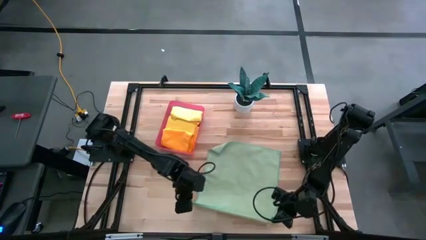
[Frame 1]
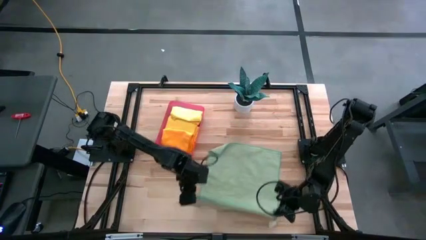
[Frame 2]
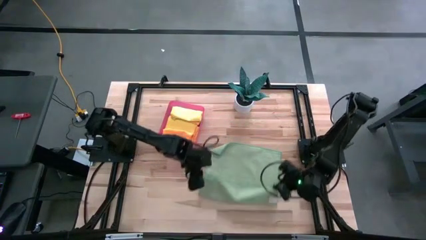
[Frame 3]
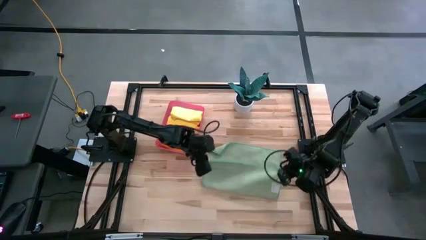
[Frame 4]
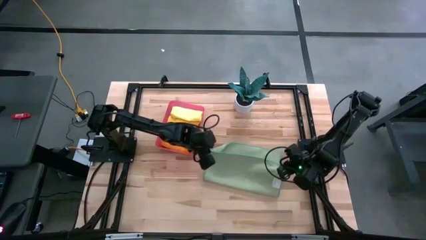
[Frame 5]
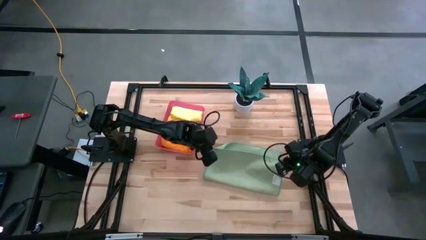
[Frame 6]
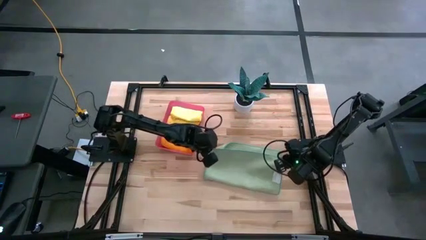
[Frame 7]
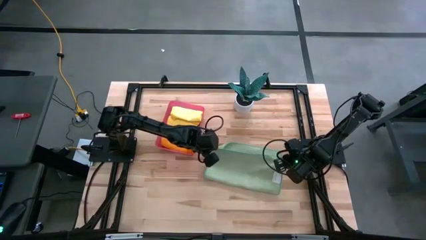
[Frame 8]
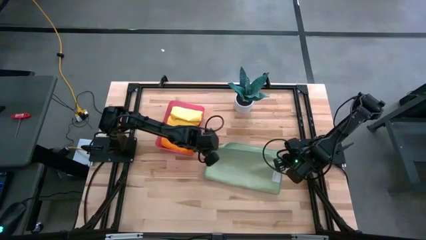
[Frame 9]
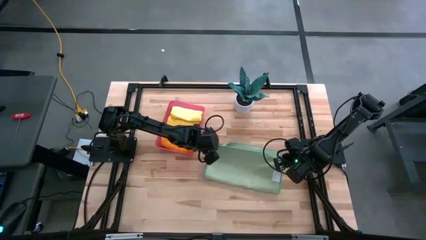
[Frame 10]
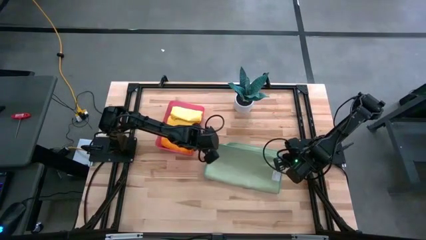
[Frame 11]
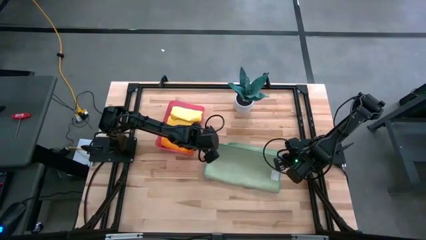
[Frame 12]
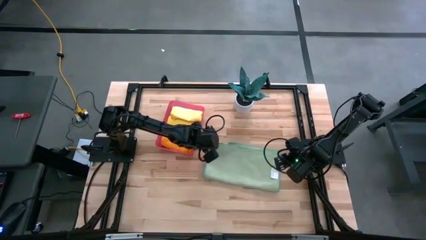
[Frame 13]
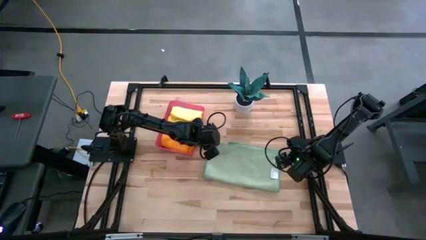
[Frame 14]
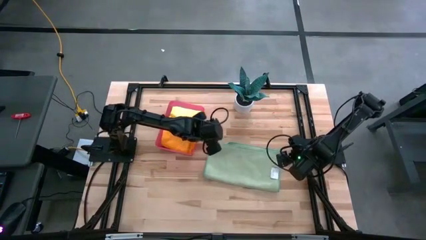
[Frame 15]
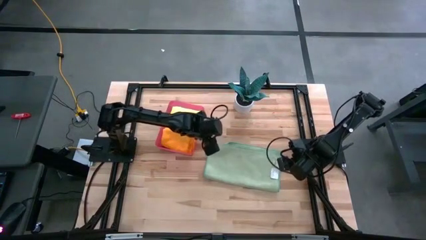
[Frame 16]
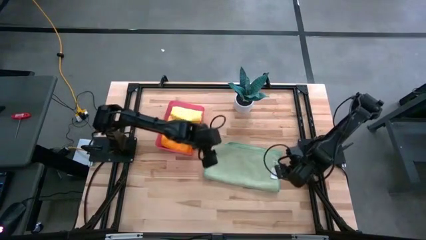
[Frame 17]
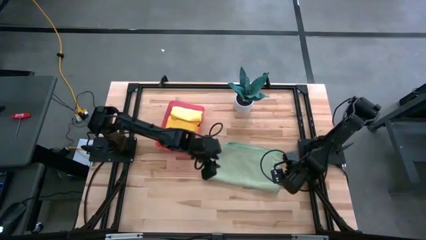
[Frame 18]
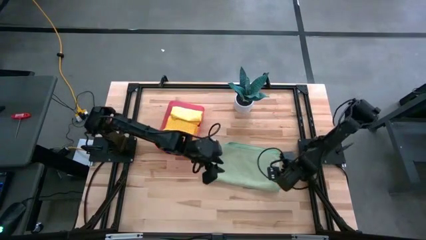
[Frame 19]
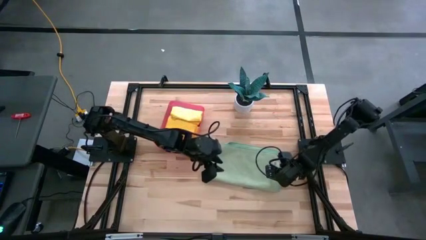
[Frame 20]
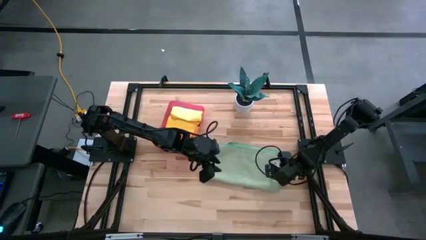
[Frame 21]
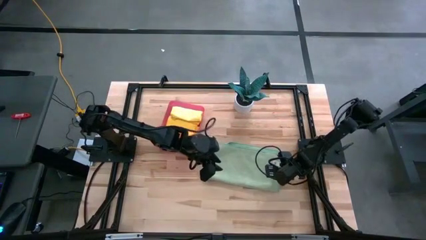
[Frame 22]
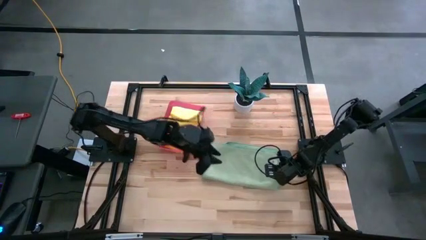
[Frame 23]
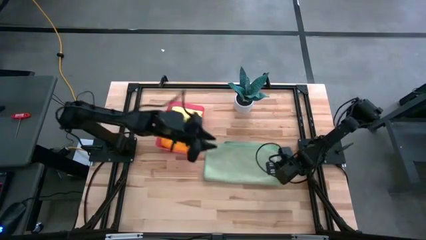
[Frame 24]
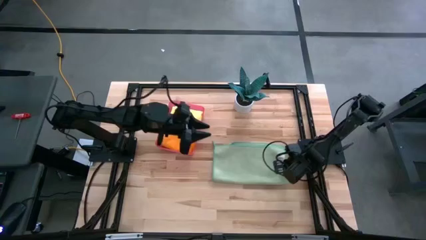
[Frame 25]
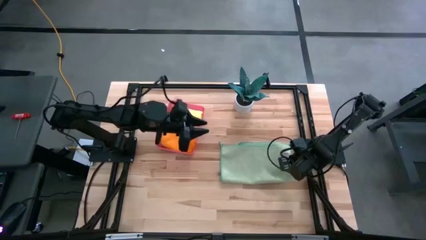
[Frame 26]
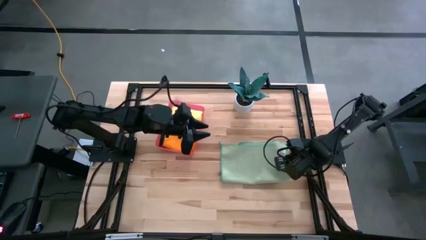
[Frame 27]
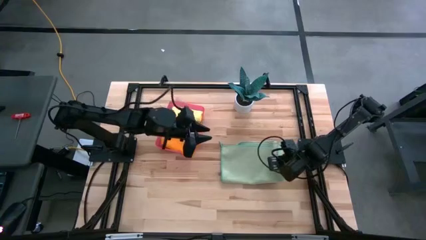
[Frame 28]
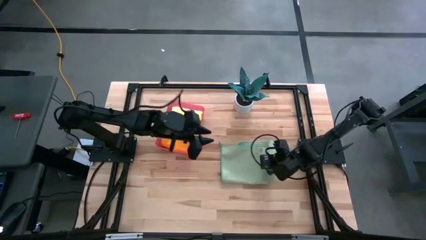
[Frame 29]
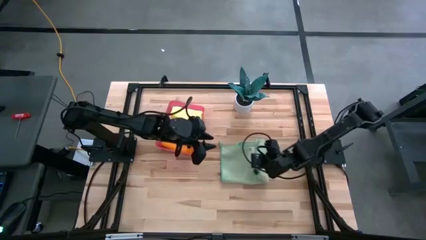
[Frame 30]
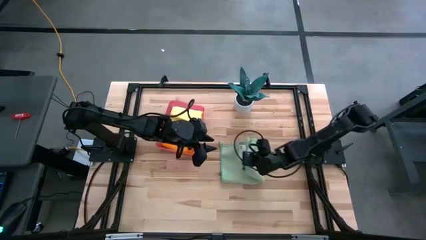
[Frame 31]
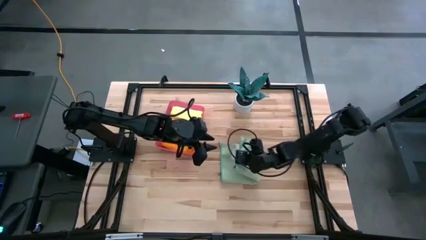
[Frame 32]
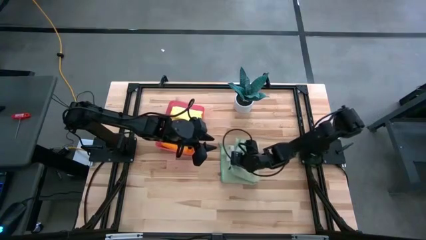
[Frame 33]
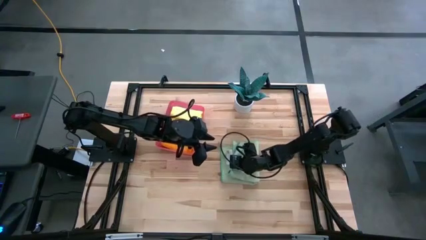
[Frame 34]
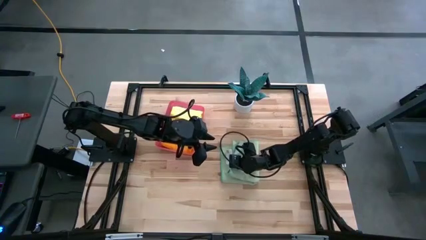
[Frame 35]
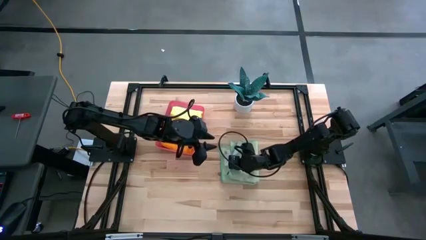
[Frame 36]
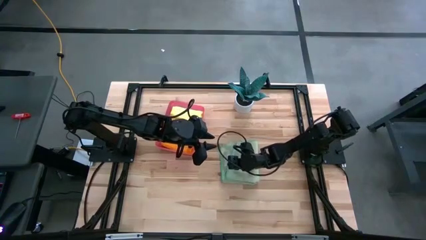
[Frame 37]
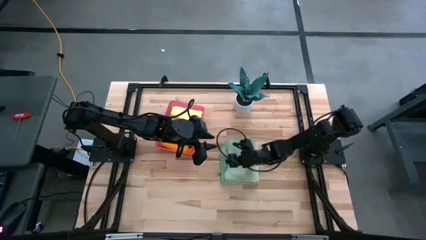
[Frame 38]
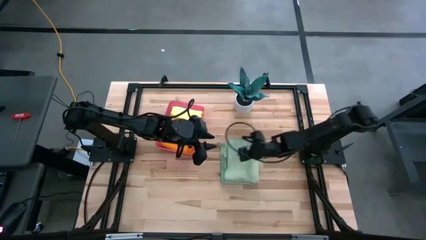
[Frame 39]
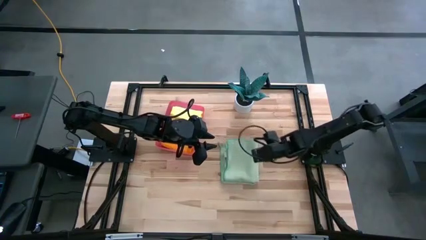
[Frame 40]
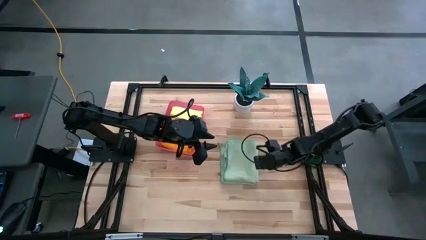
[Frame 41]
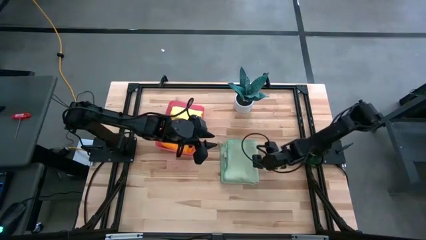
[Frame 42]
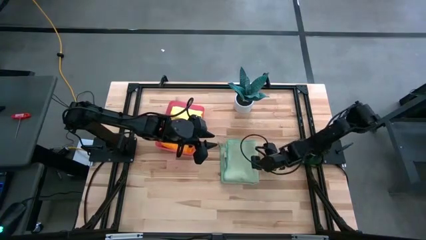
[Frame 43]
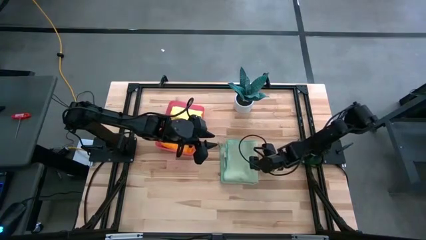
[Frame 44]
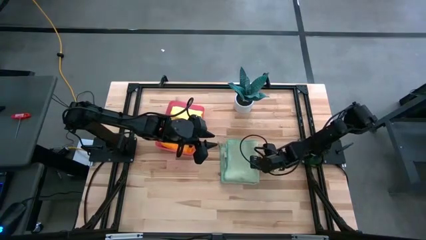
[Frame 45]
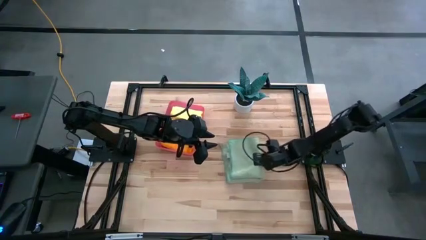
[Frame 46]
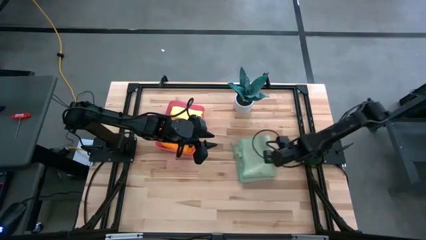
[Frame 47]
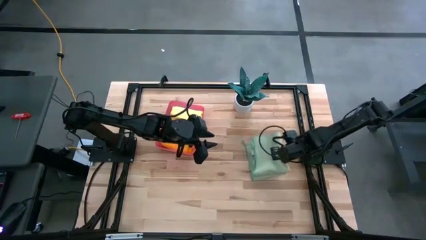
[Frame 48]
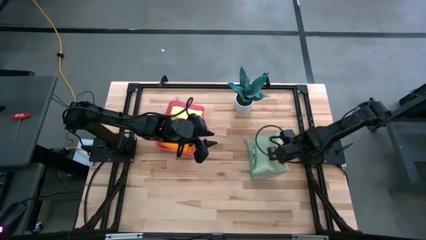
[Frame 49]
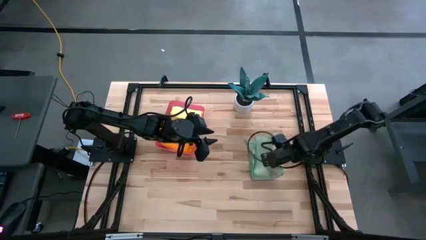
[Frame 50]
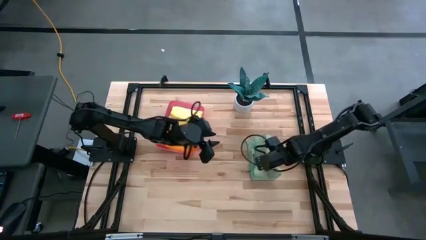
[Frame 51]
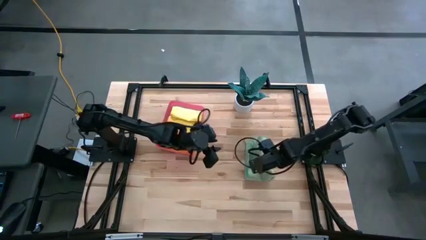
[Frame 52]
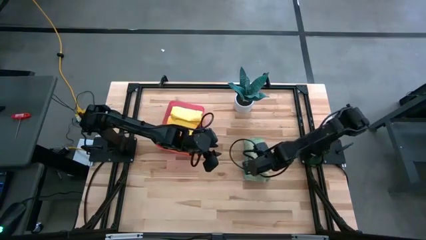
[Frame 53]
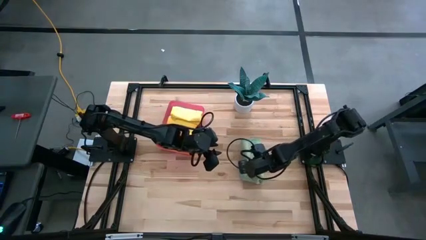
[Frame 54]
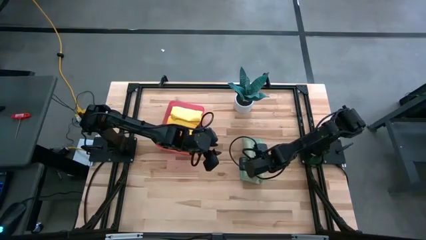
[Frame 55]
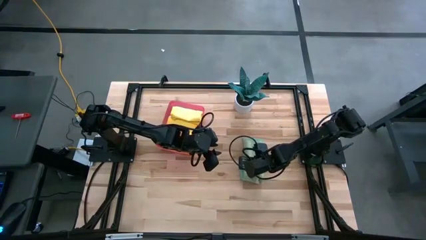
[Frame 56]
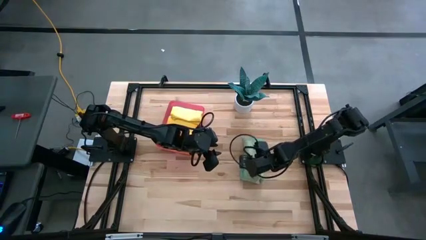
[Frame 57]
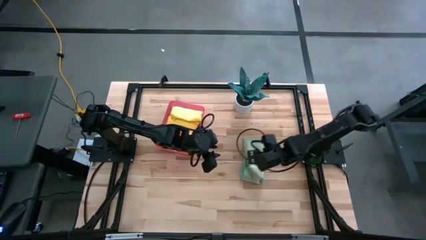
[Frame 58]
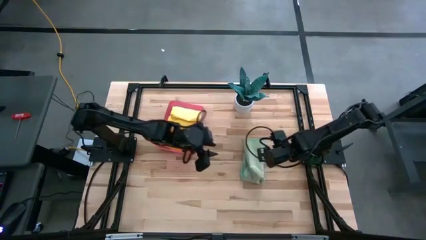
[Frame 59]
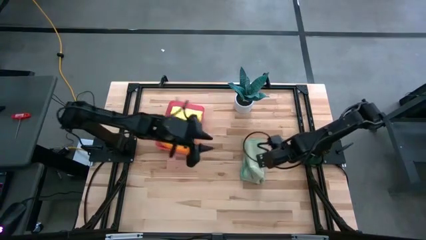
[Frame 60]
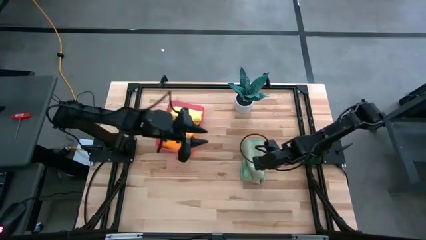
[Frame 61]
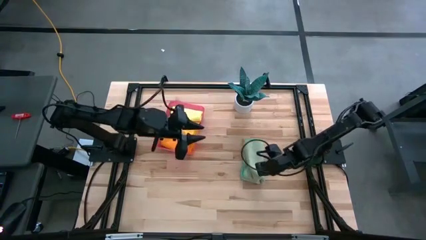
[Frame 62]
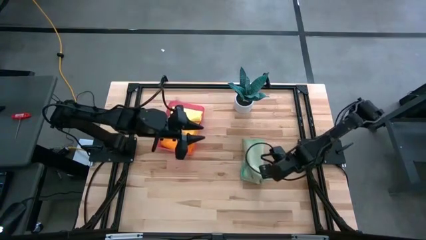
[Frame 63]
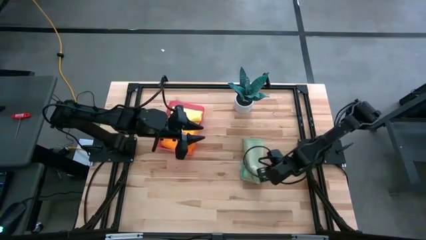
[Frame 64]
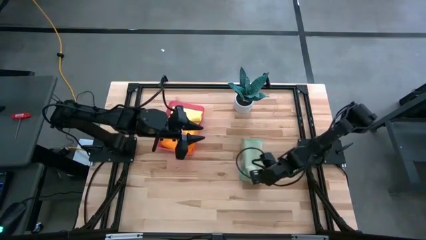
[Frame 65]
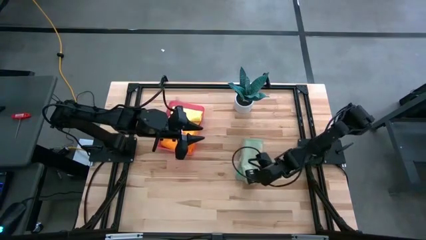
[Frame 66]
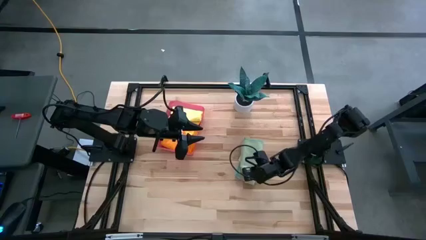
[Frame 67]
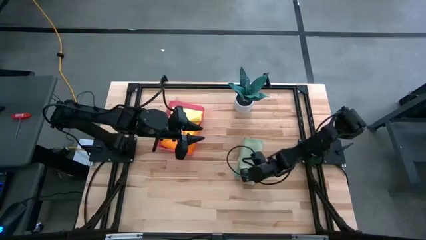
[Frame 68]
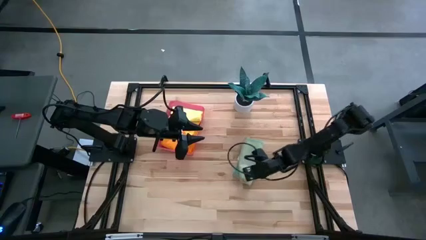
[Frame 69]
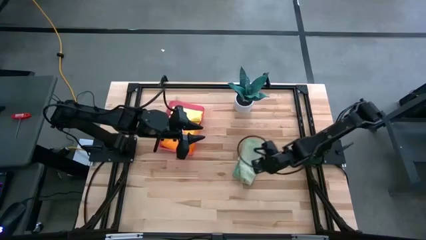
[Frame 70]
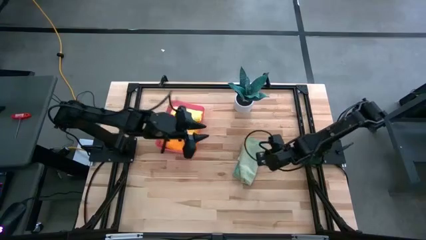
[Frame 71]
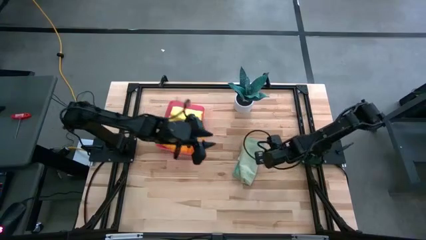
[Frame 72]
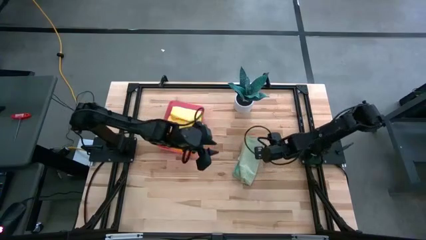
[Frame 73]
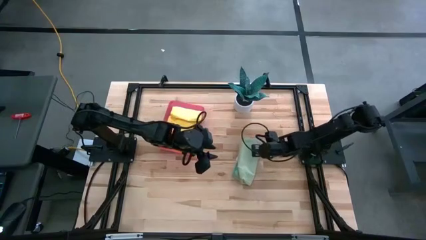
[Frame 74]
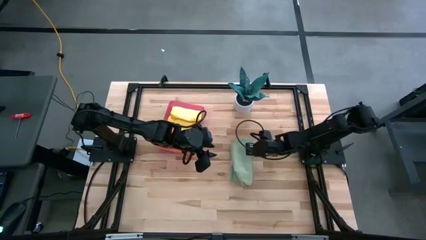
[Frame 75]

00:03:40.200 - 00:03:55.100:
Task: Fold microfiber towels
Fold the green microfiber cloth

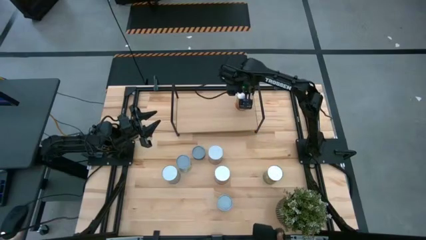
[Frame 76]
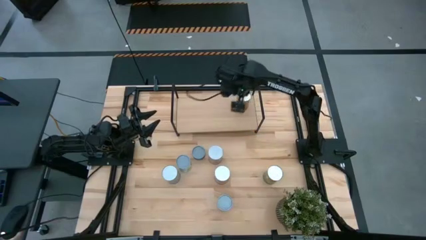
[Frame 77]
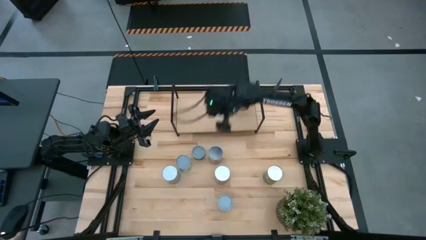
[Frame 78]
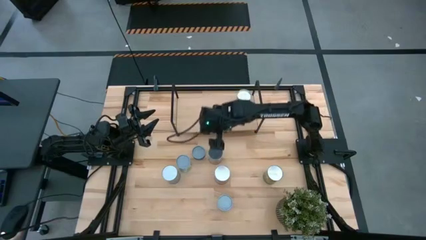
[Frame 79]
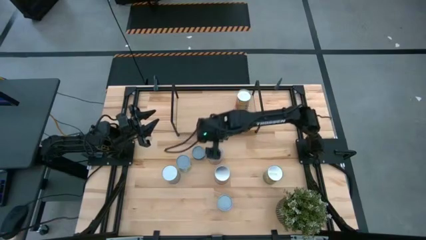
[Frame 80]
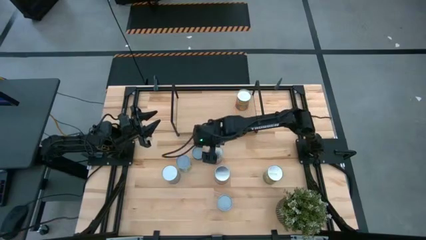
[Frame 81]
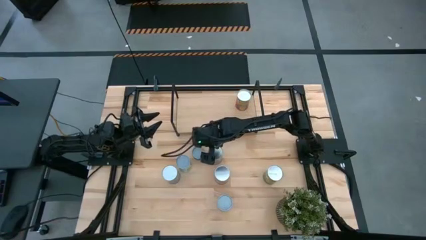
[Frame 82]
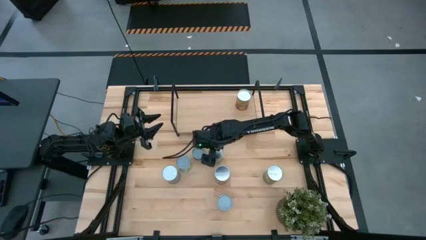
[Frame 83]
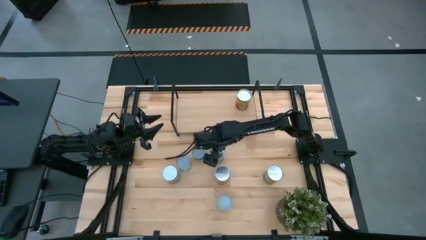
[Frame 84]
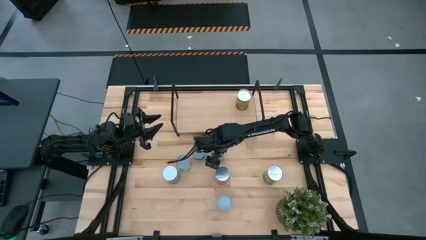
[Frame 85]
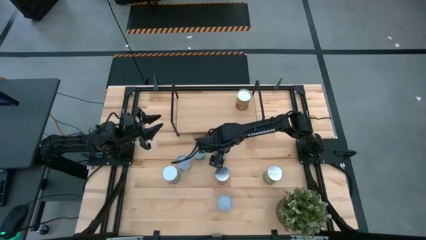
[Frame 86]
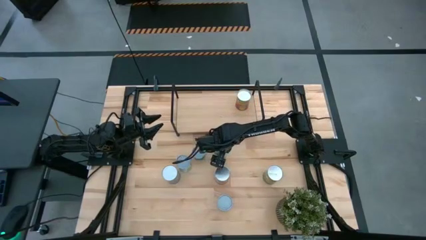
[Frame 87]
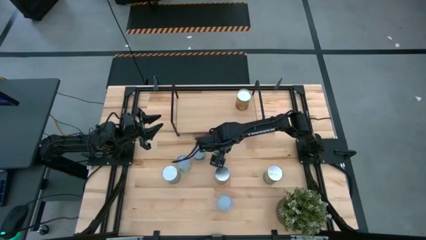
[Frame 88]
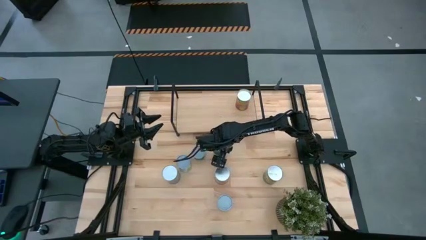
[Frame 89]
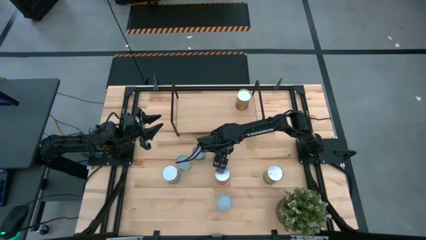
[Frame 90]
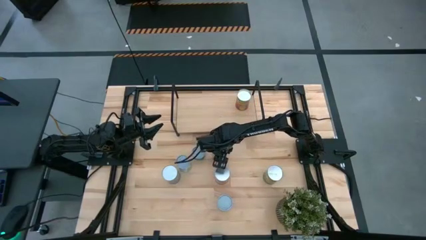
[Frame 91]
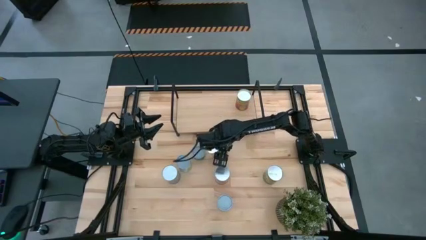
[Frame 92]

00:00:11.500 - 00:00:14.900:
Task: Pick and place cans onto a shelf
Put the canned peaches on the shelf
